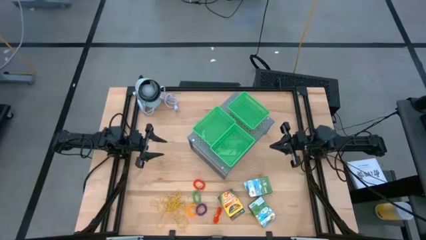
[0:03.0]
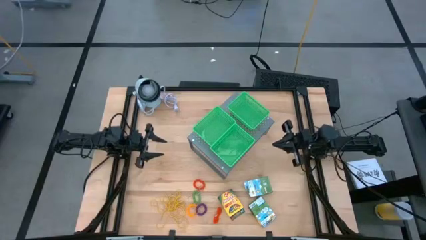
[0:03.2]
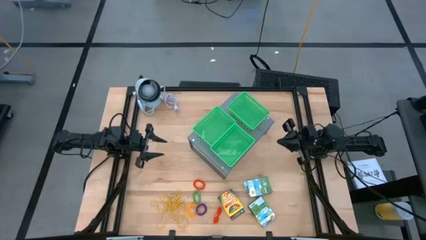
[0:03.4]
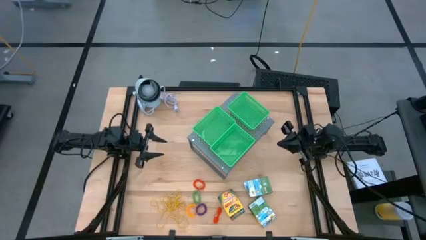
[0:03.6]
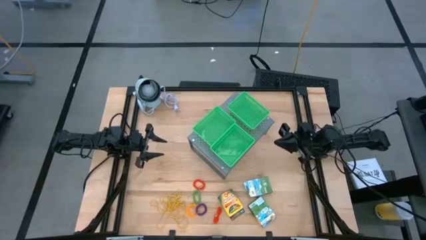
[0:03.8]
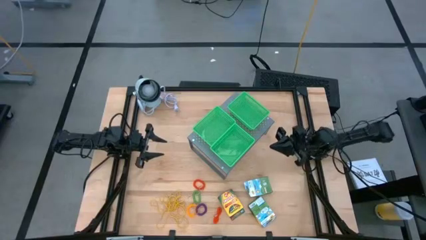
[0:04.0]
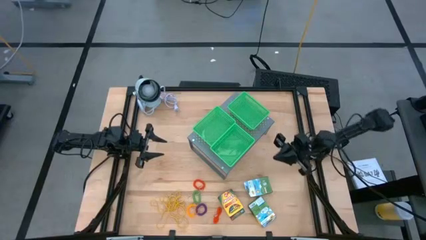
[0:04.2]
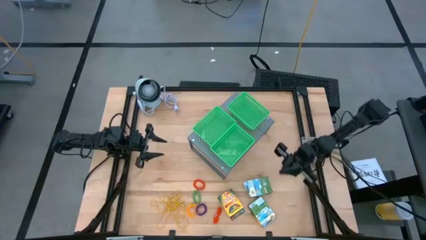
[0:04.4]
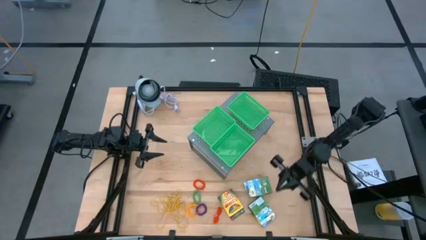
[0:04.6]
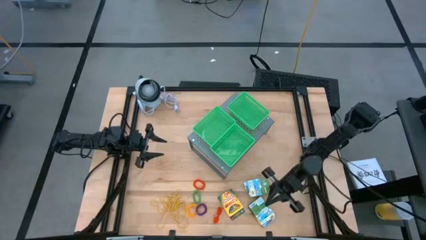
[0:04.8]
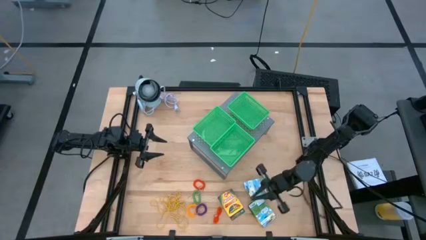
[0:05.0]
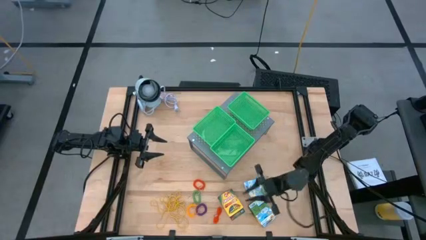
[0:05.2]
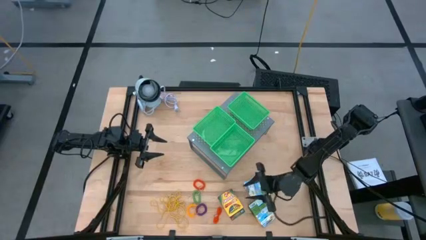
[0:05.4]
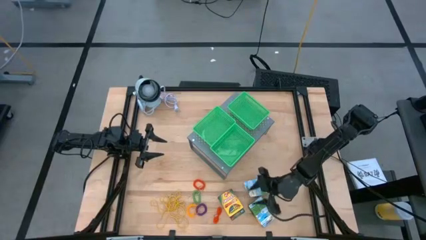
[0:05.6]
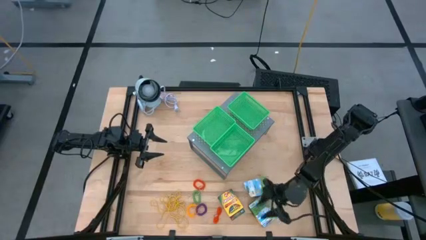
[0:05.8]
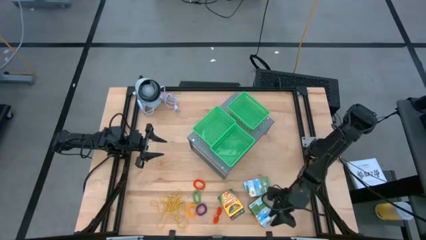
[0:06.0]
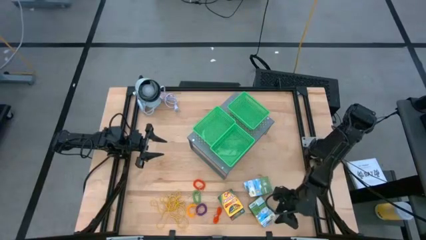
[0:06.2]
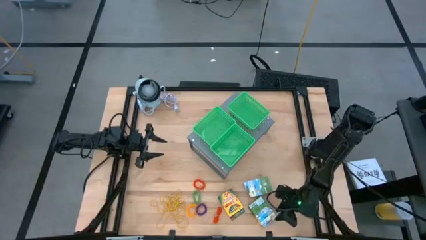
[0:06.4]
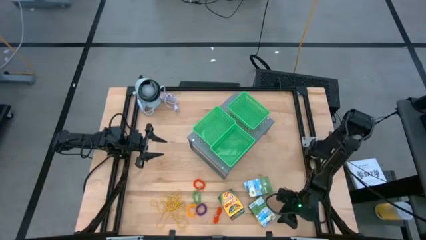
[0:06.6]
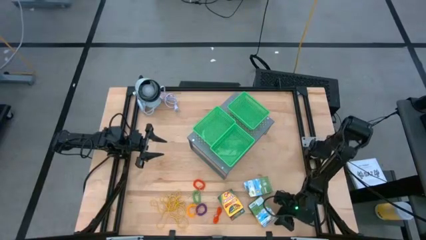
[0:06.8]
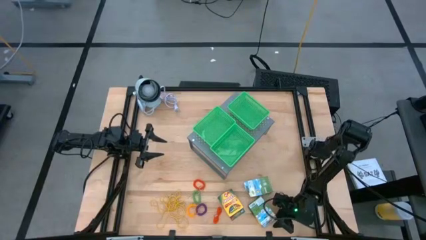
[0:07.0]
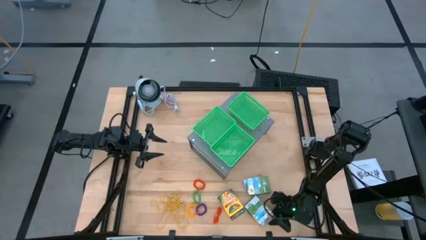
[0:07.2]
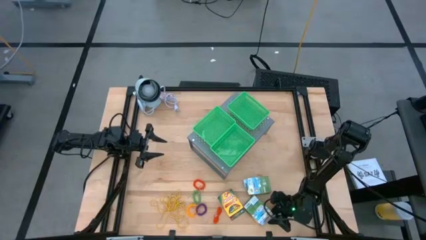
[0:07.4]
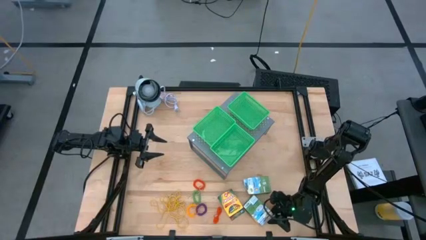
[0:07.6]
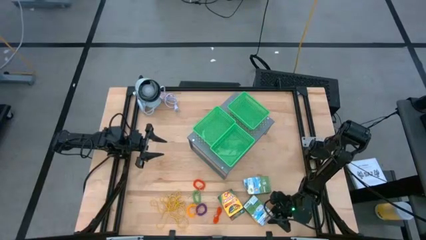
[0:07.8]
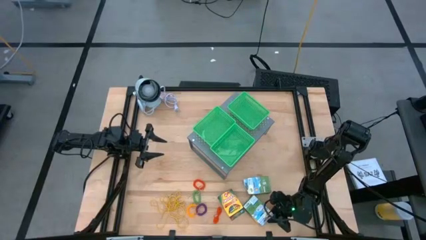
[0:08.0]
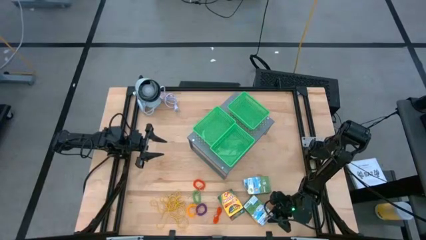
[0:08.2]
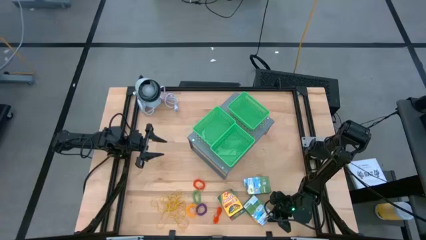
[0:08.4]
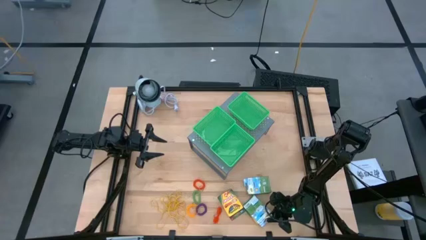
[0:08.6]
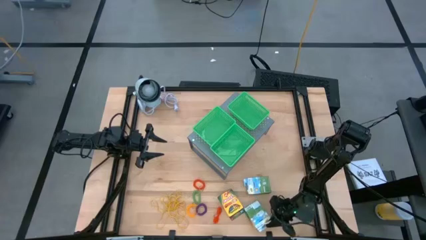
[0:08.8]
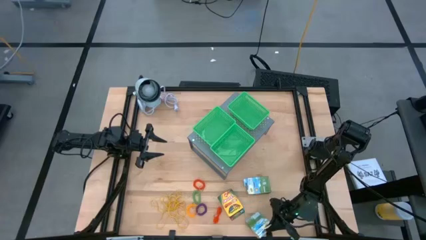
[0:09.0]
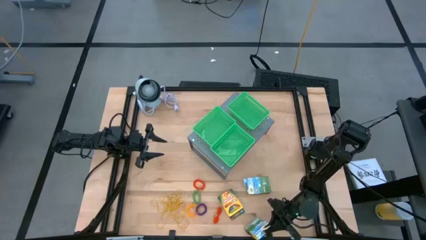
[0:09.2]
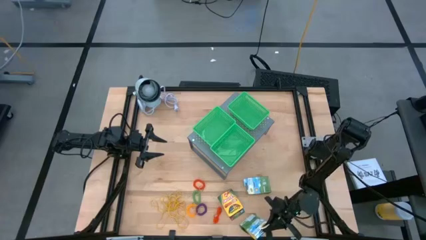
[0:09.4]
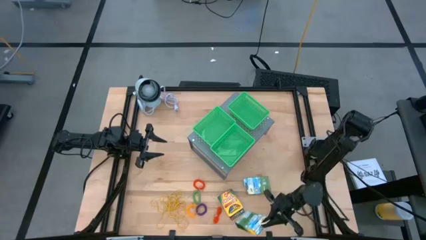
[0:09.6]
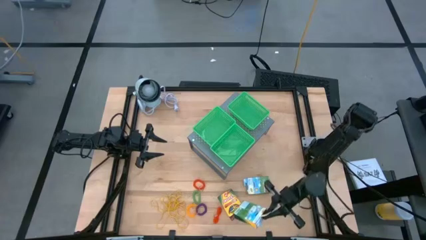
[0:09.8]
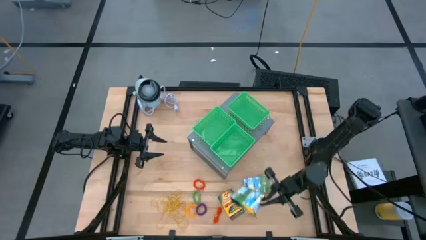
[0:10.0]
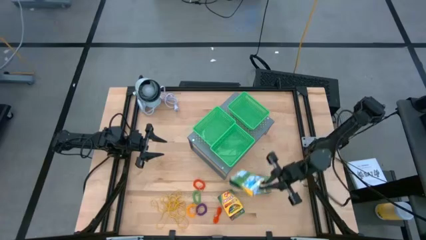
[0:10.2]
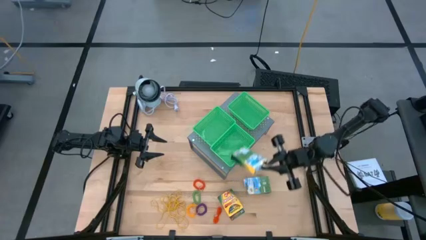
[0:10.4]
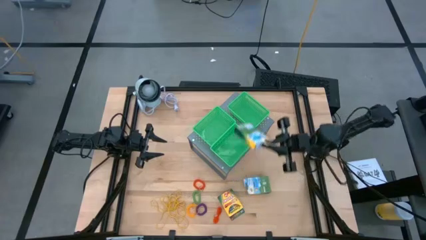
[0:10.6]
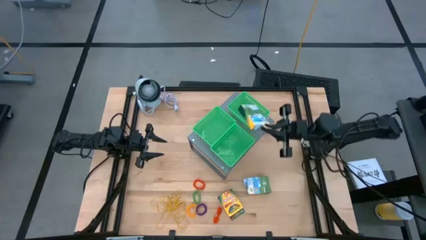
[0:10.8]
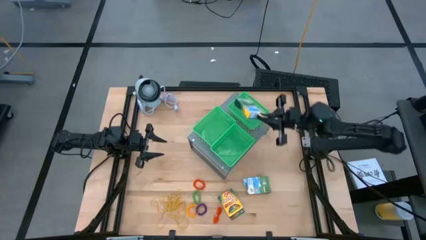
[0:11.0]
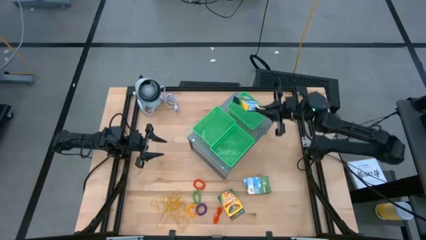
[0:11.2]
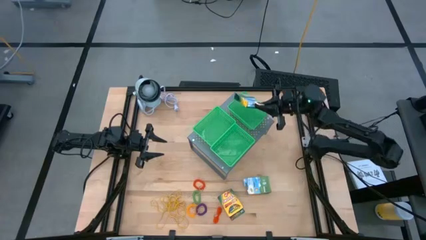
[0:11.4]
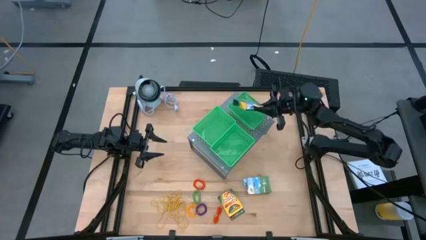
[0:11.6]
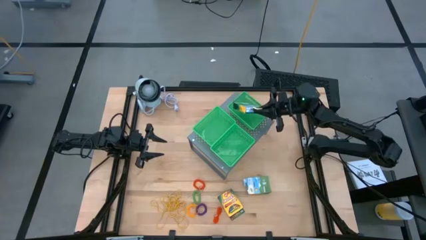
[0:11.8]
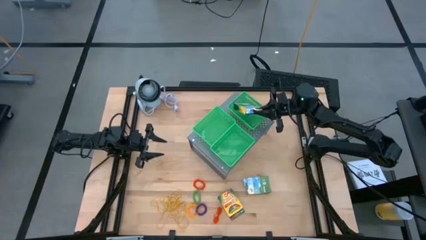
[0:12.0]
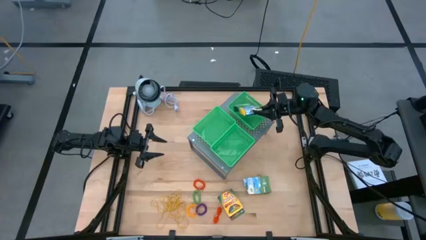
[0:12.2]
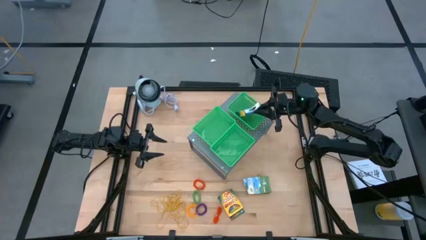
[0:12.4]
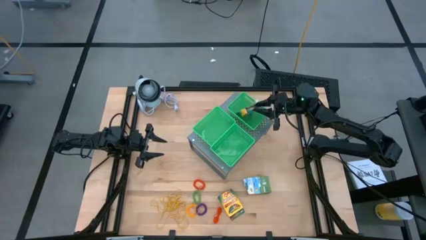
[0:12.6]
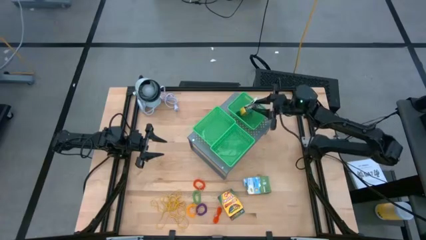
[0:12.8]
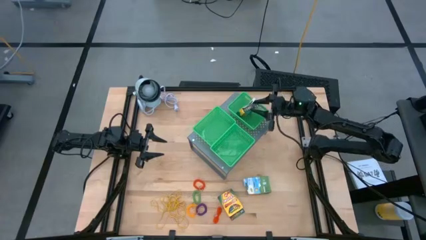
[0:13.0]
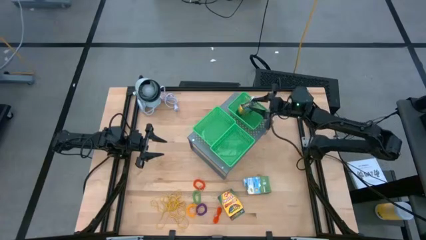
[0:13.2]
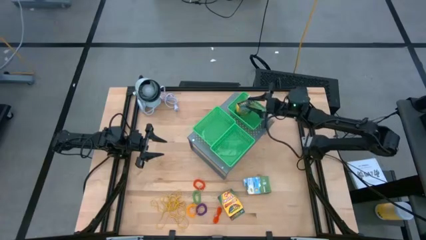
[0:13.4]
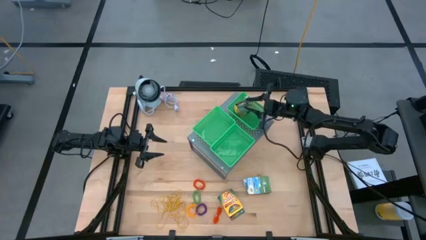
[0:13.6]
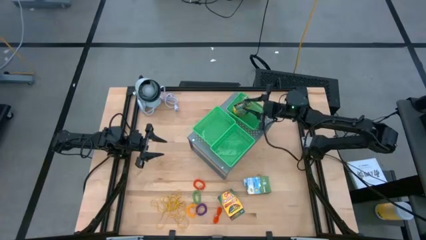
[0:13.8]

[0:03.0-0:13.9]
Task: Pick & Place Office Desk Supplies
Put the yellow crayon box into the top right green bin on the shelf

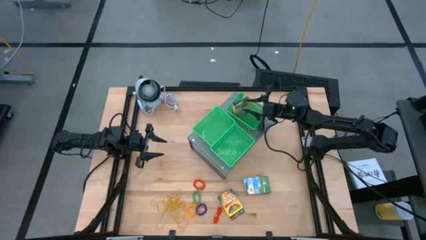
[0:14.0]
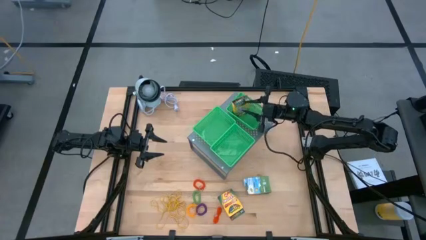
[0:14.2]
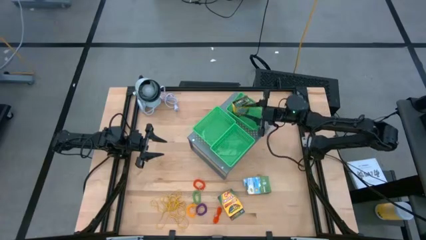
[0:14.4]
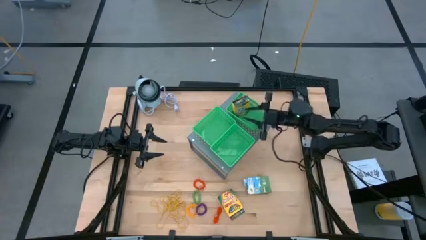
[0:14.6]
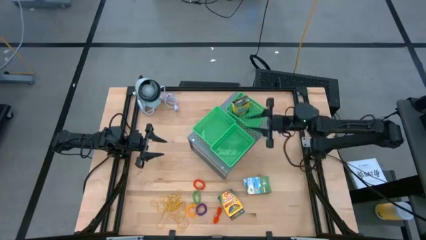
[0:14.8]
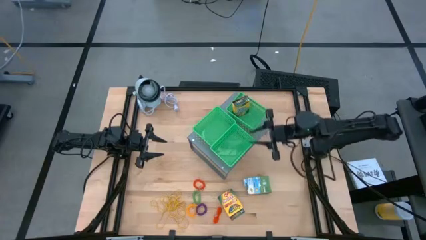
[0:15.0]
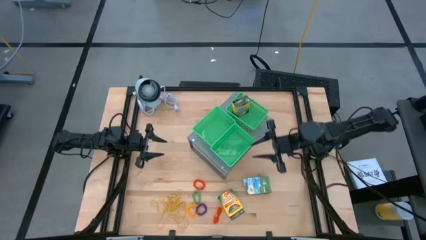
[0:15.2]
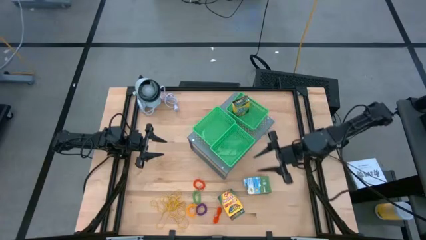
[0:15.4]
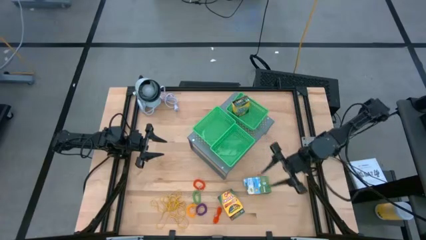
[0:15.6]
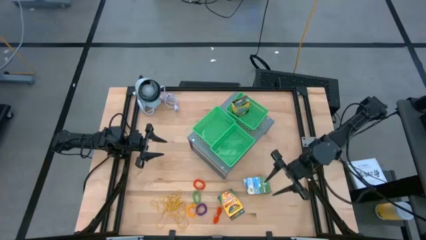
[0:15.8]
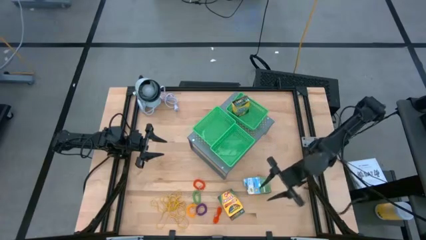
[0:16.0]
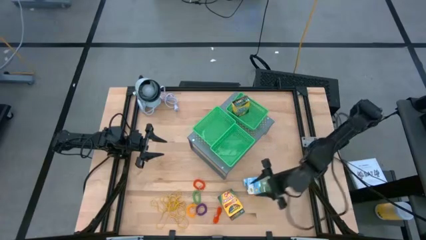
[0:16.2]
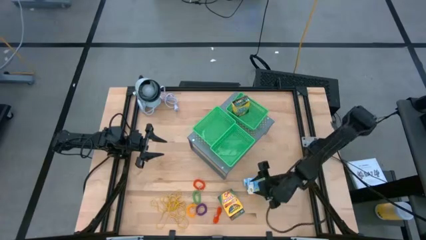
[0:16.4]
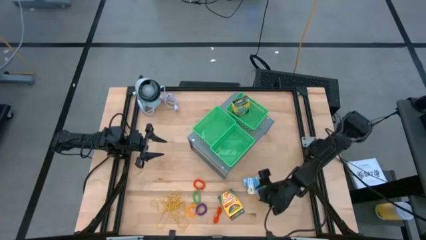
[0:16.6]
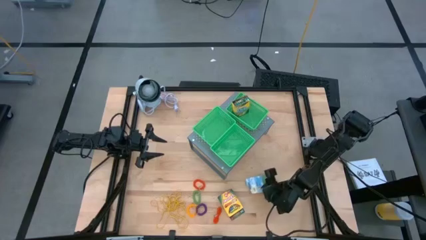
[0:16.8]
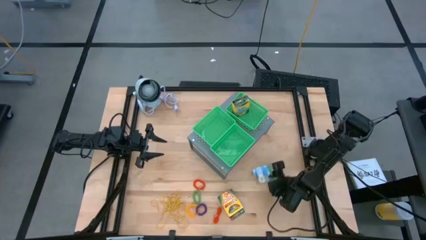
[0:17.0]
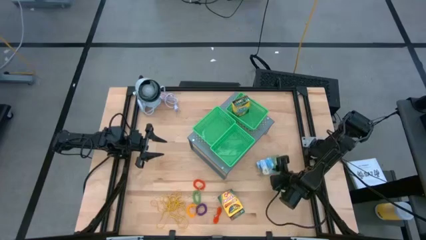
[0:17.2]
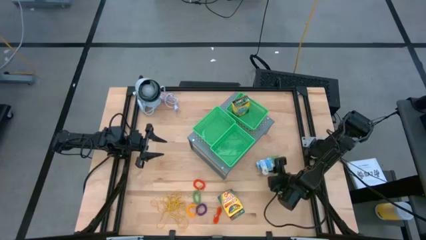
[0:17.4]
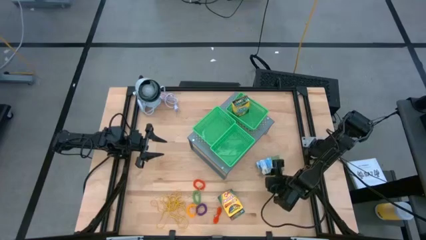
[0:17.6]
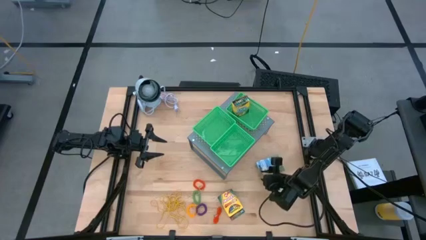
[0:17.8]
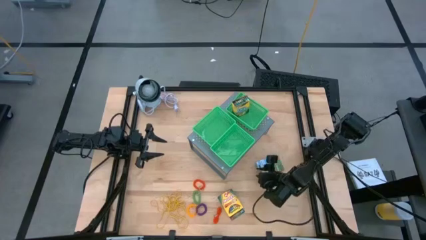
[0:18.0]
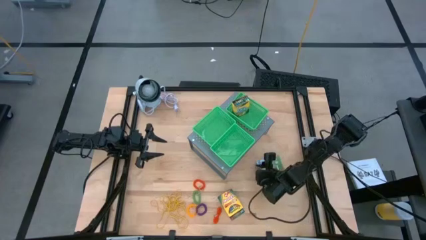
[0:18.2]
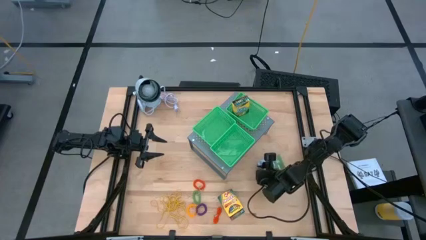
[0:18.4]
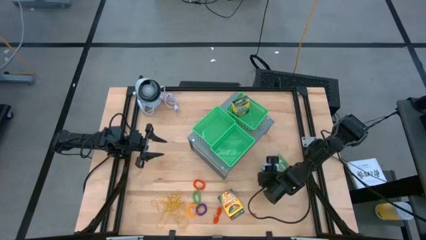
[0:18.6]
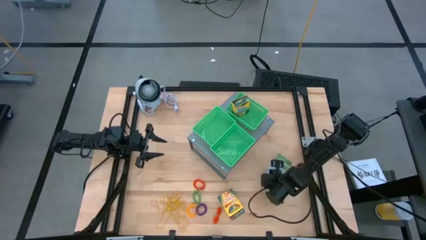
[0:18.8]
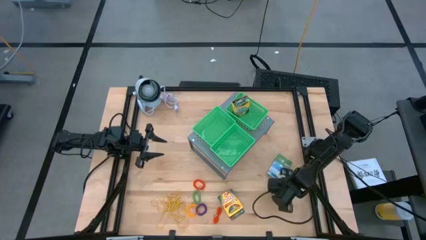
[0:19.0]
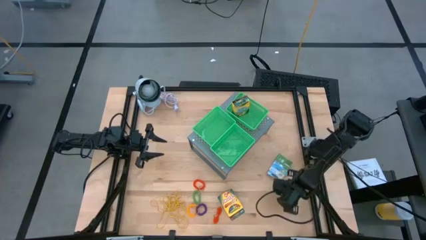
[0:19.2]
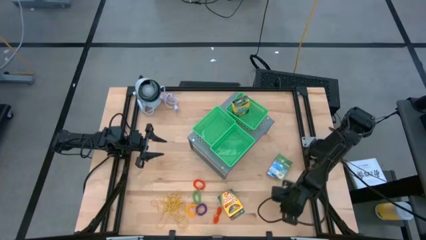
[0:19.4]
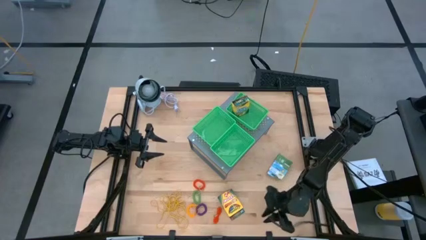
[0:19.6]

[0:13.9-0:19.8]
Put the yellow crayon box into the top right green bin on the shelf
